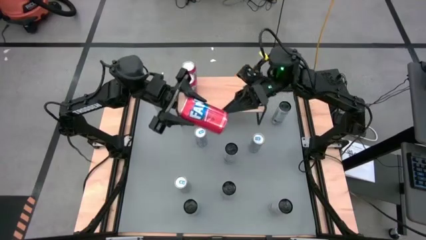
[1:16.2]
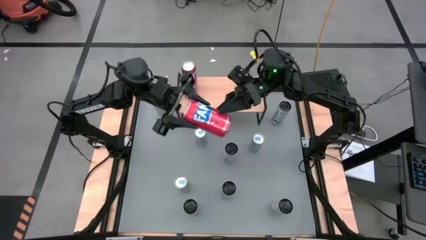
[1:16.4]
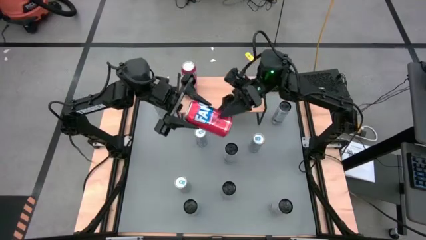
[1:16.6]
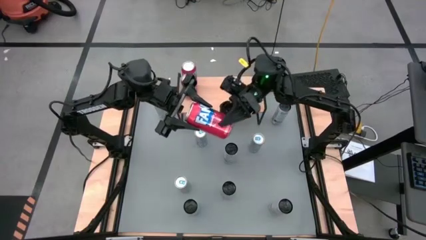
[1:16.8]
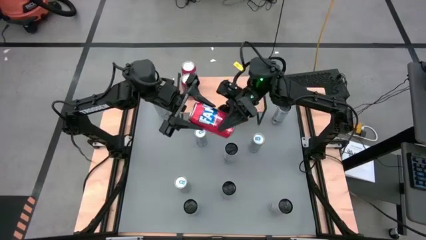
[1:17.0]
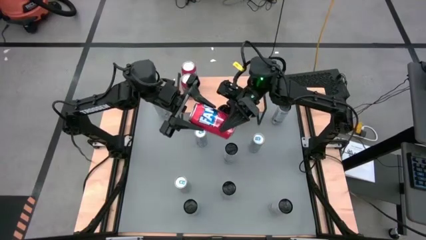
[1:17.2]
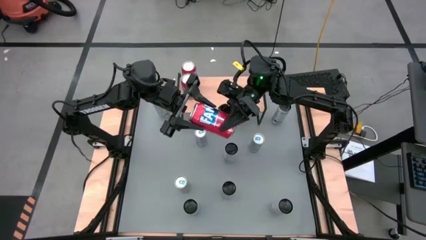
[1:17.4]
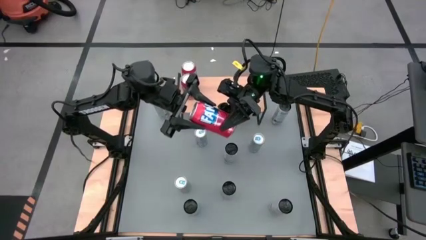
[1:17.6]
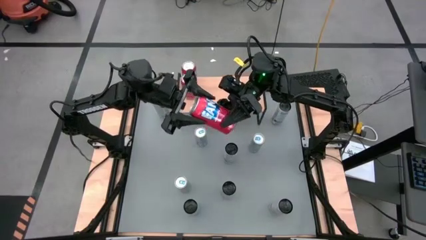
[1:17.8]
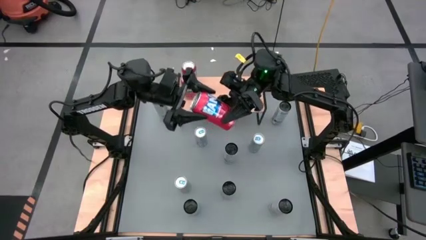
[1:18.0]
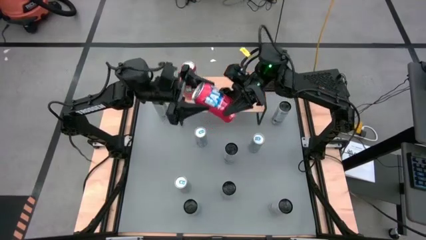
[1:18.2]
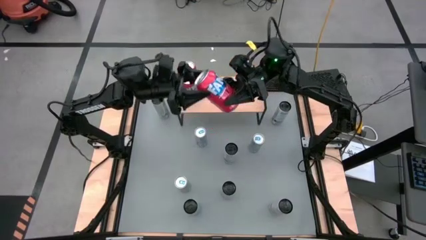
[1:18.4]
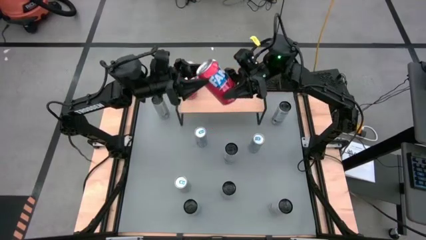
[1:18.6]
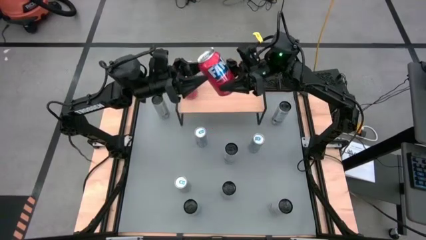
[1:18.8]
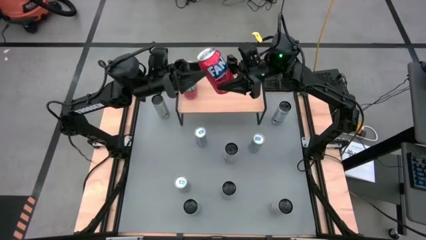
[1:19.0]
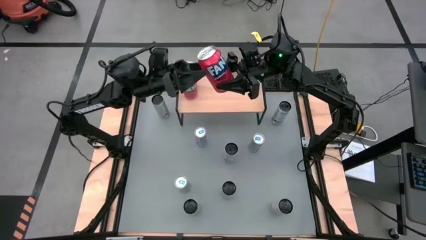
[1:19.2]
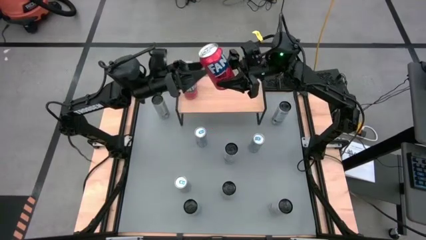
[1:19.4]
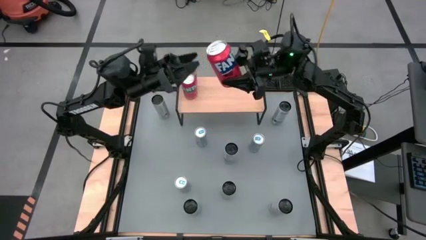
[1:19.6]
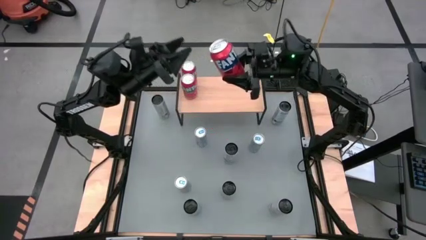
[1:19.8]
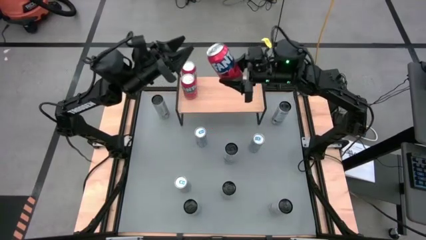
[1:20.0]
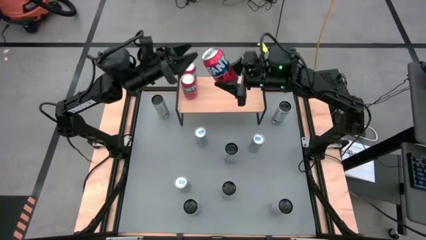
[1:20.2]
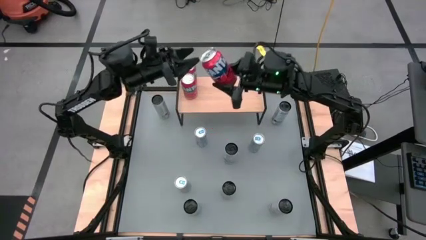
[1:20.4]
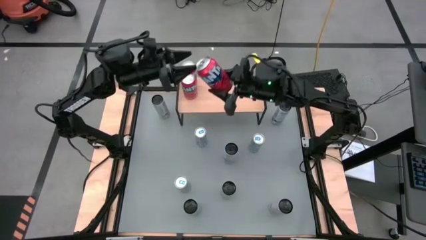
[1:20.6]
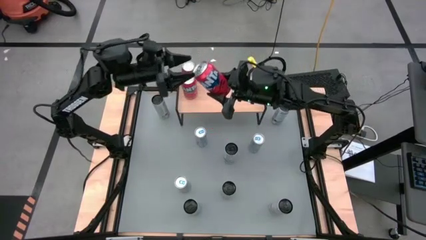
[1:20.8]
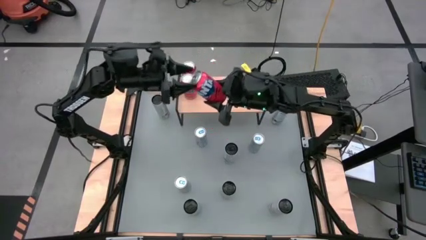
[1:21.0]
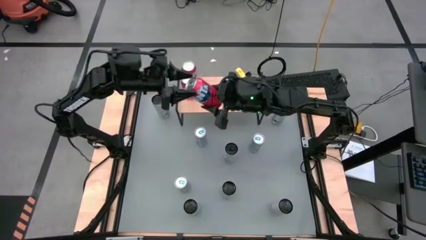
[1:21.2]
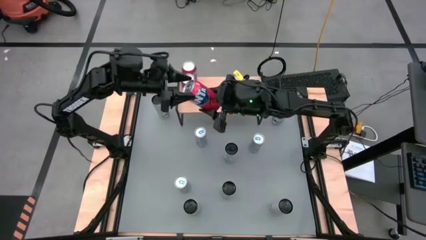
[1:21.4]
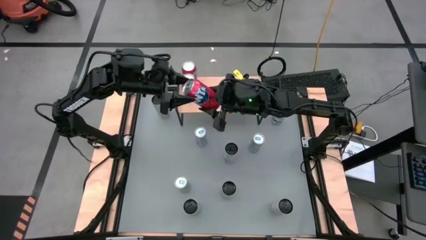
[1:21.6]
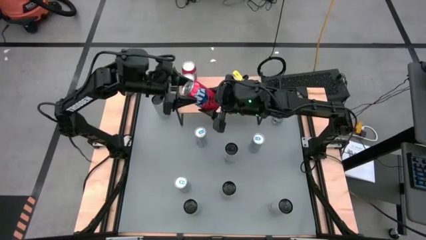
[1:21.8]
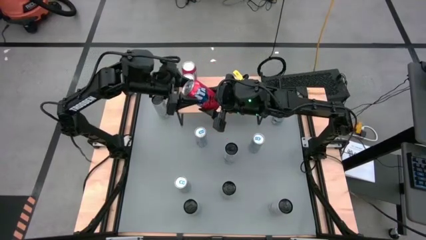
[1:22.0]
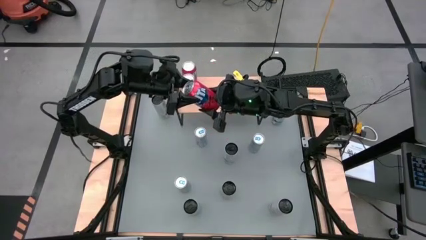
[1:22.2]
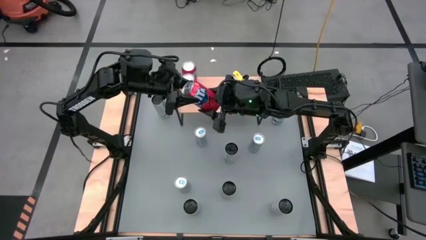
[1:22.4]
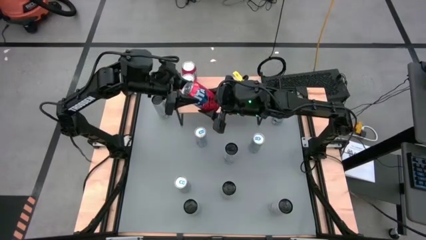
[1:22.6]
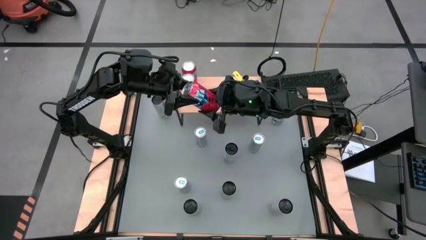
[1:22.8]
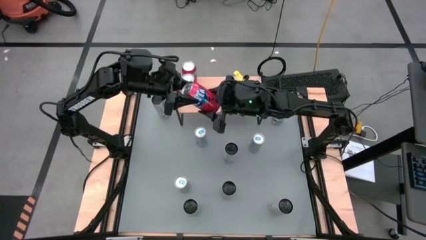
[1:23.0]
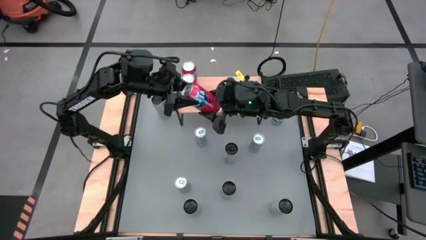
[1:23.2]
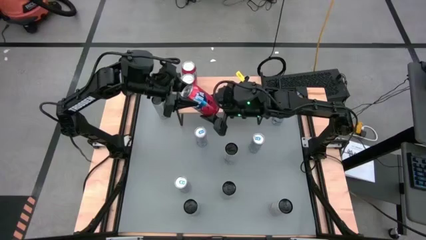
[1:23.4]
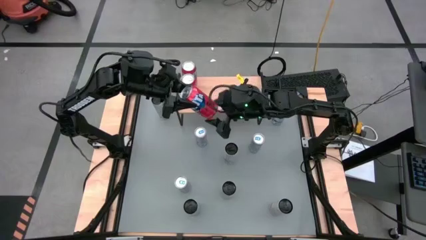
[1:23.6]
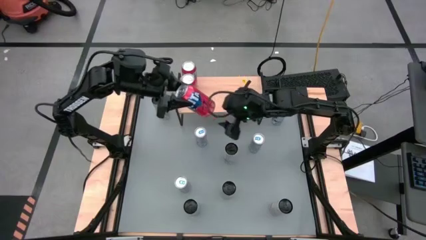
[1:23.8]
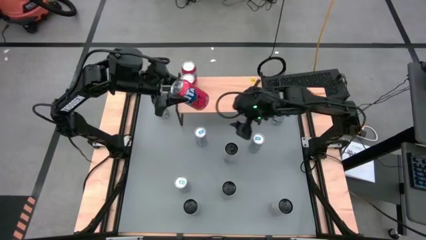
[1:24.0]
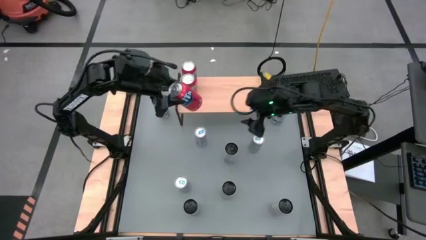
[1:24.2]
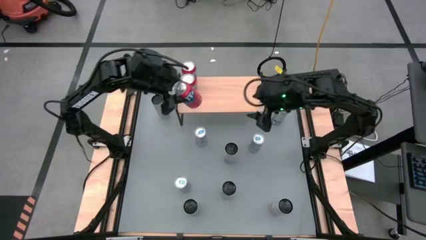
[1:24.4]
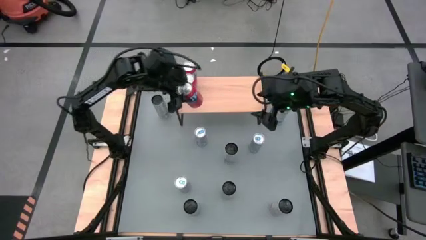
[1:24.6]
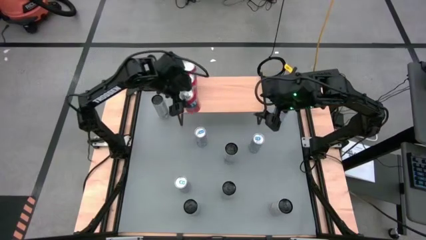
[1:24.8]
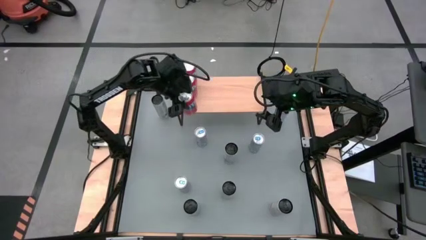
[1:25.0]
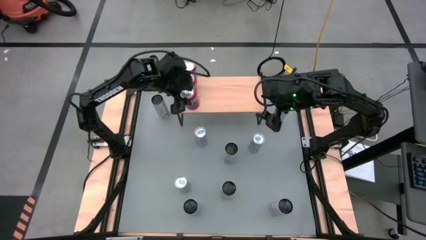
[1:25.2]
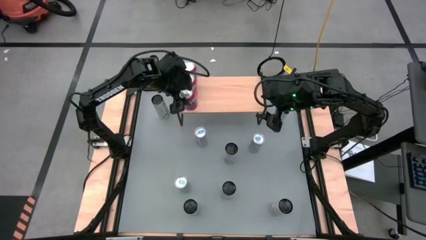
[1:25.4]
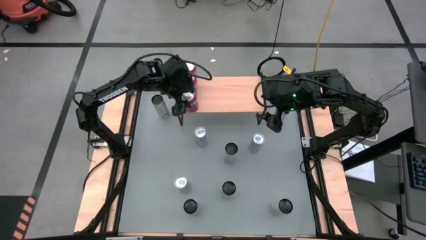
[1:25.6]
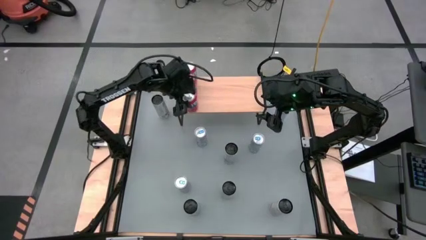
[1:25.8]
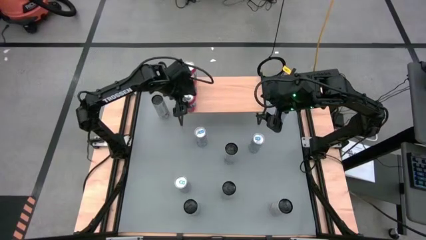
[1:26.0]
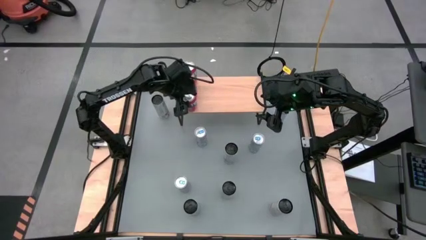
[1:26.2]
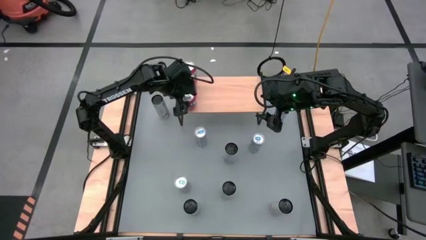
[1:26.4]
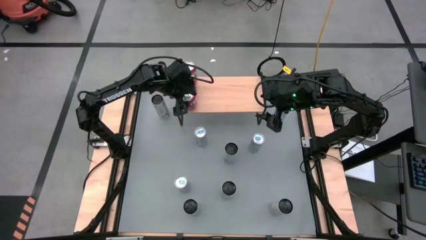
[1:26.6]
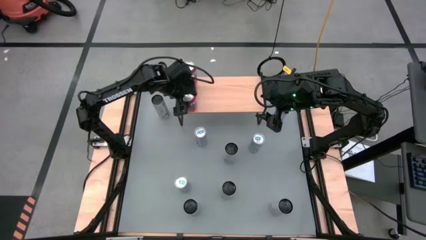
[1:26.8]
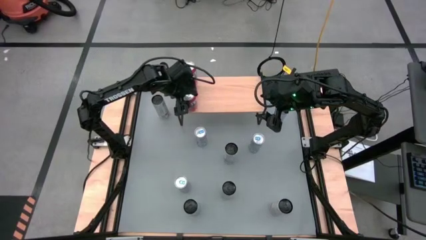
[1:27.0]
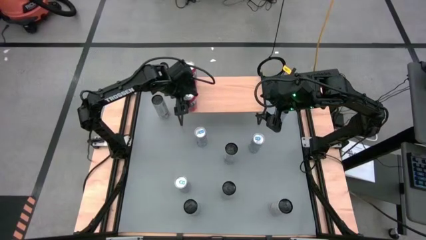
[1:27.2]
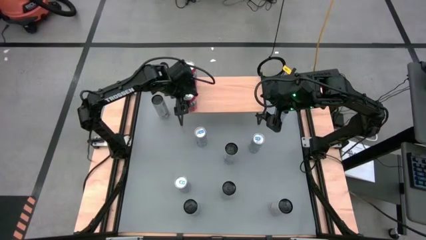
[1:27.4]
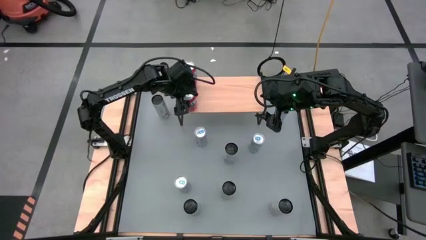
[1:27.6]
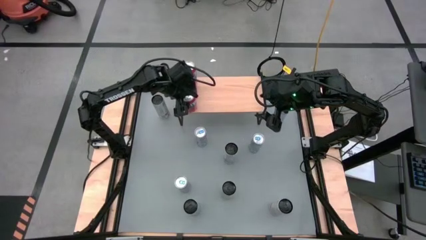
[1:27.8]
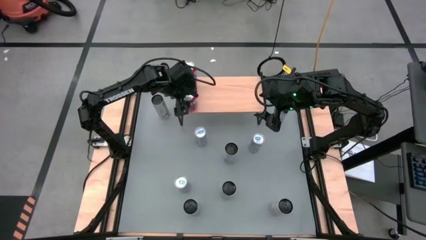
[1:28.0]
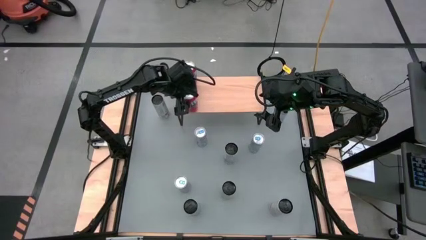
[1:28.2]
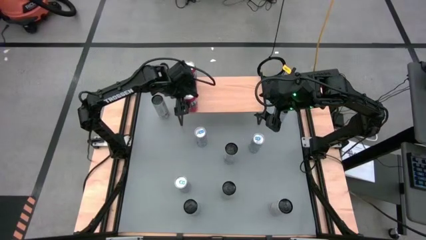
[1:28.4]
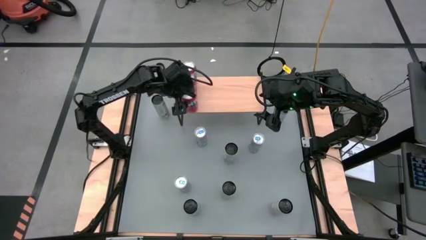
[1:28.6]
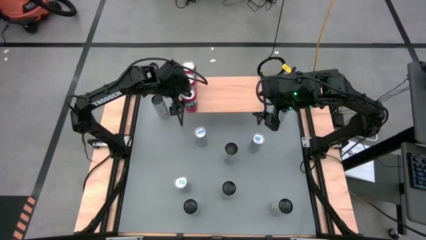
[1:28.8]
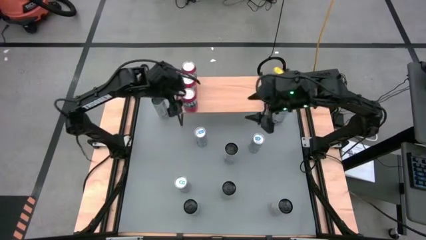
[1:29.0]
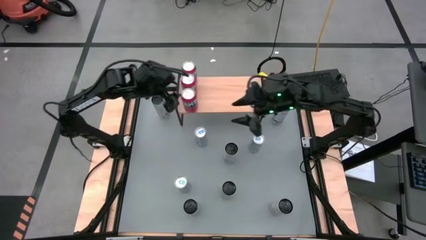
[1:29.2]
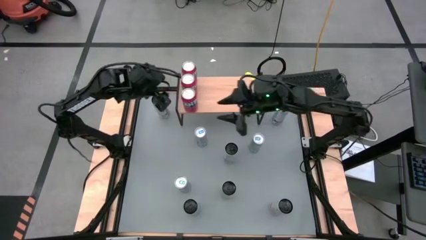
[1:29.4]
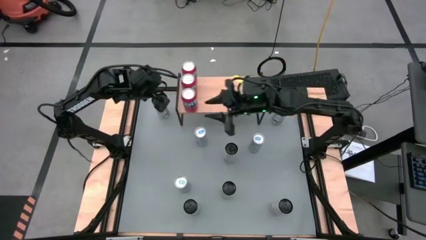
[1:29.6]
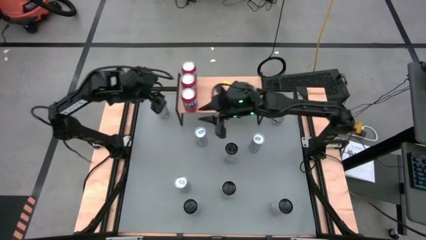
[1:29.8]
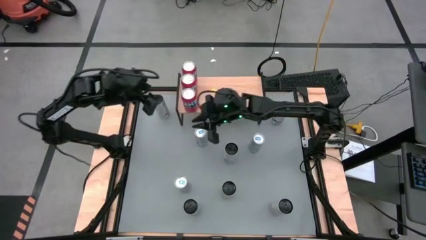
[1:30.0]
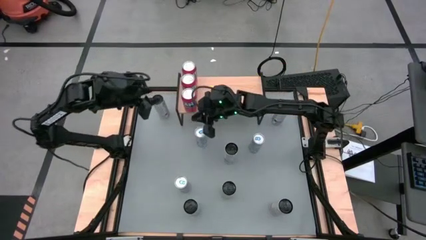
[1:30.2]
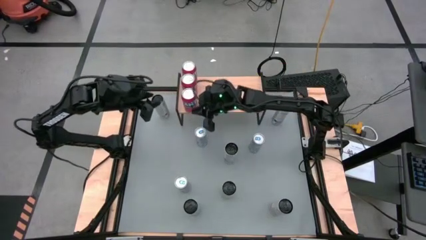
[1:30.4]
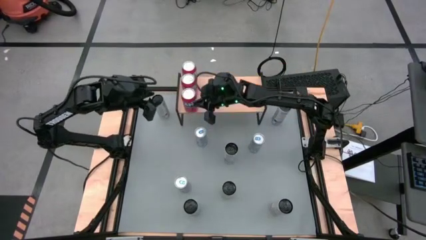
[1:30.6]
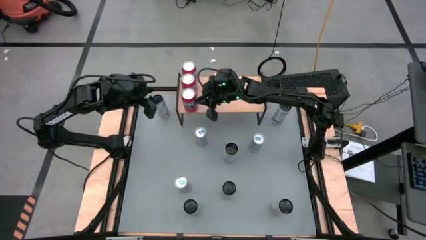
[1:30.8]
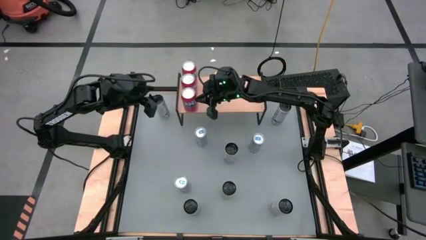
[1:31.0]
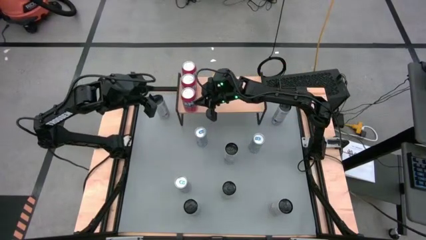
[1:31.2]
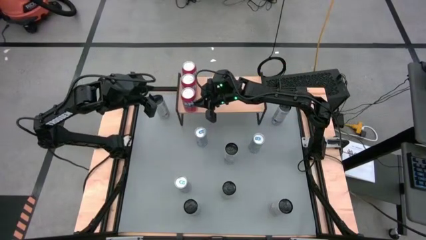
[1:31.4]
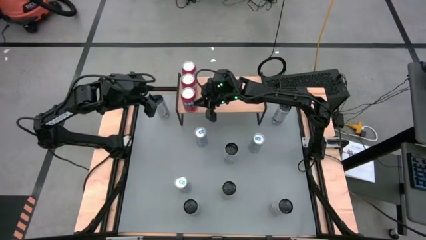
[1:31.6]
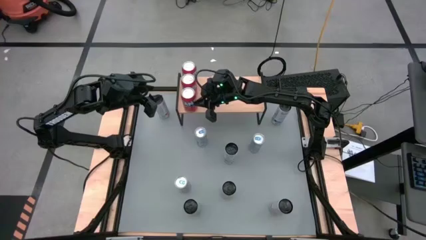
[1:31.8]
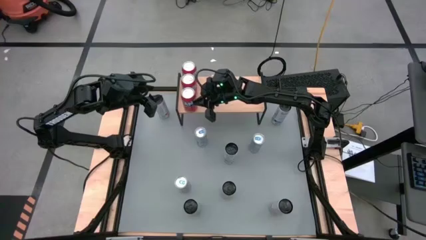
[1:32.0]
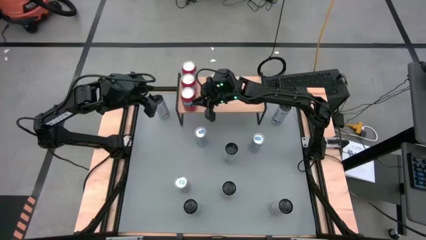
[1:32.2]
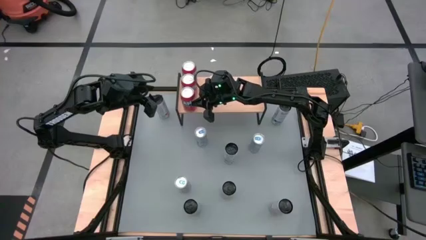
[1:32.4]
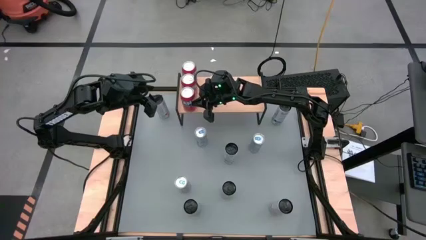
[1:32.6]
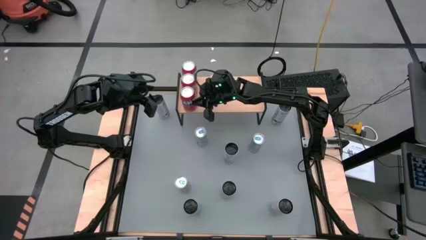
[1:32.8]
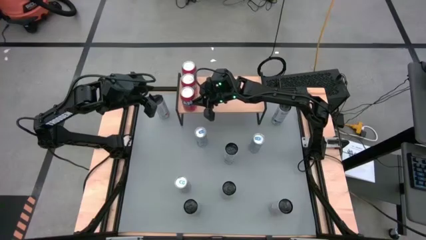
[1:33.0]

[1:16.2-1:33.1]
Task: Place canned beverage on shelf
Put the red soda can on the shelf aligned with the other red soda cans
